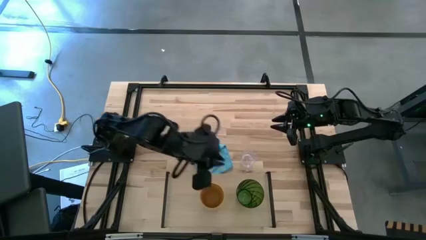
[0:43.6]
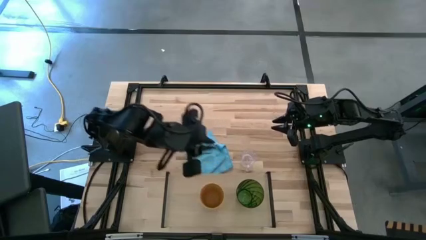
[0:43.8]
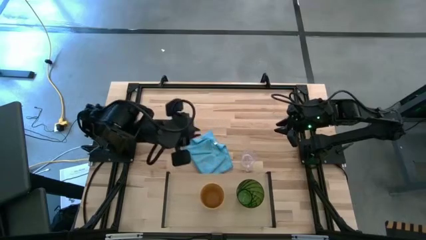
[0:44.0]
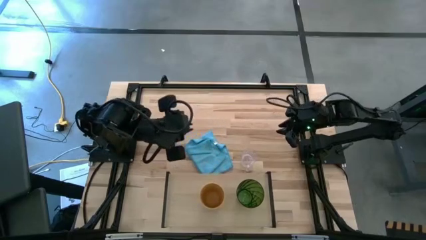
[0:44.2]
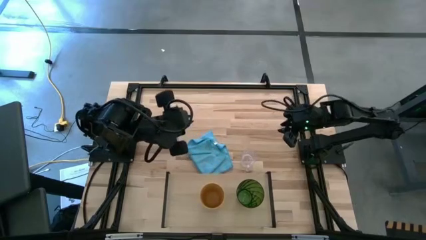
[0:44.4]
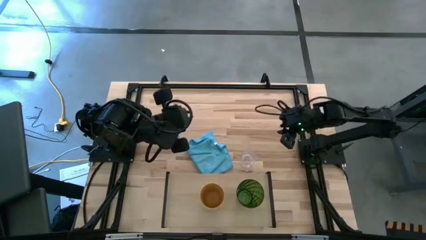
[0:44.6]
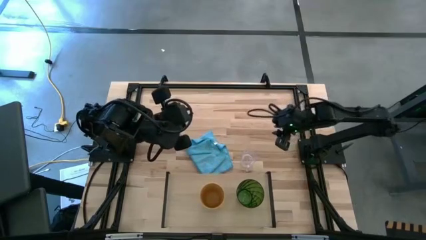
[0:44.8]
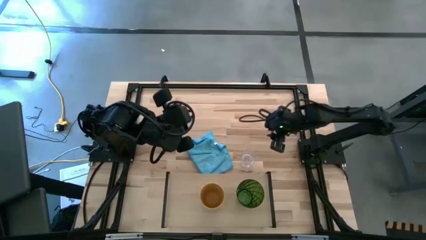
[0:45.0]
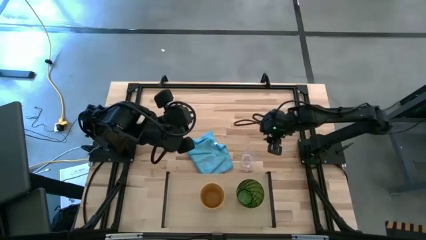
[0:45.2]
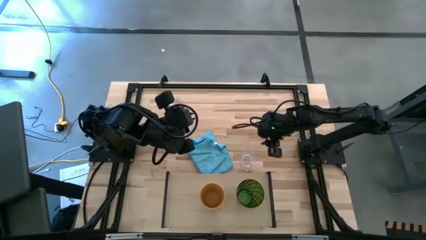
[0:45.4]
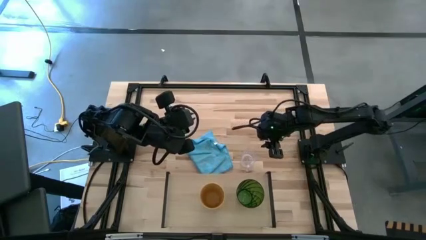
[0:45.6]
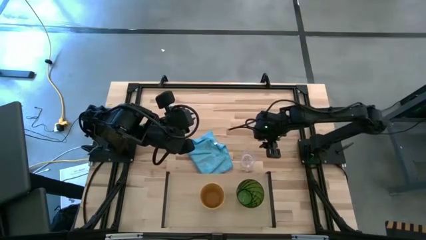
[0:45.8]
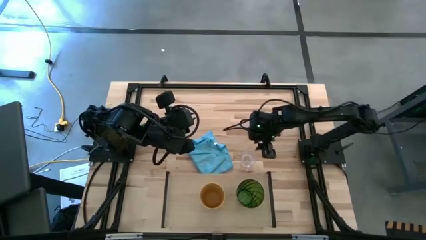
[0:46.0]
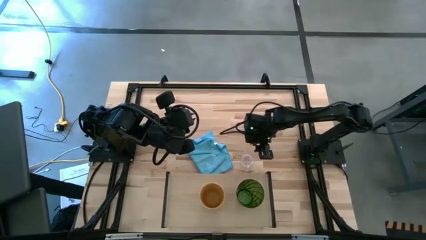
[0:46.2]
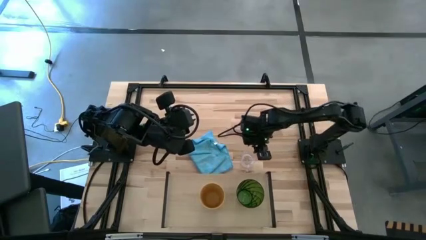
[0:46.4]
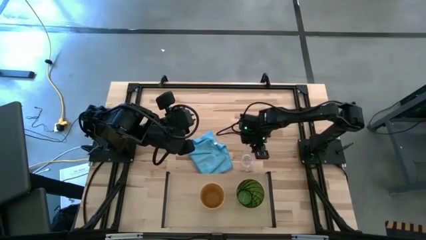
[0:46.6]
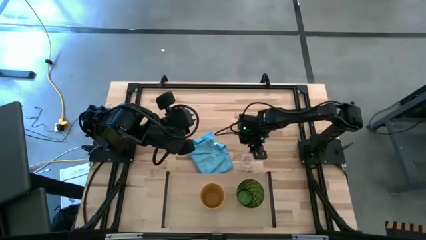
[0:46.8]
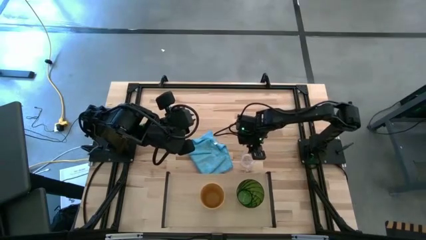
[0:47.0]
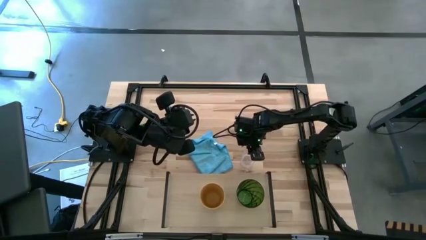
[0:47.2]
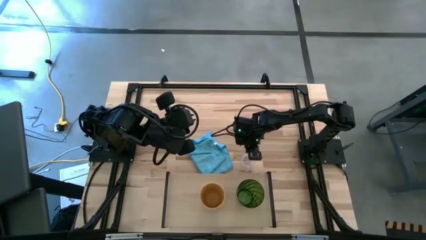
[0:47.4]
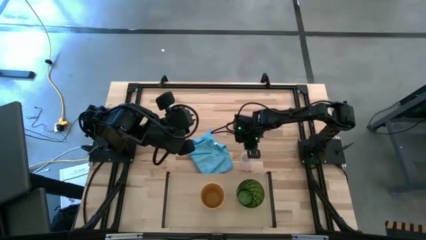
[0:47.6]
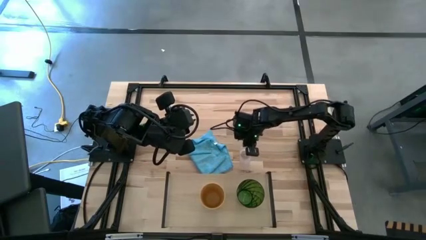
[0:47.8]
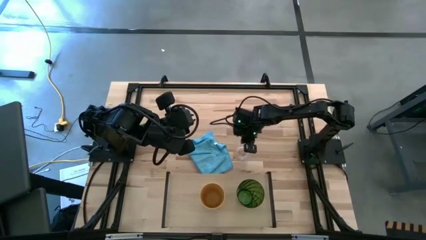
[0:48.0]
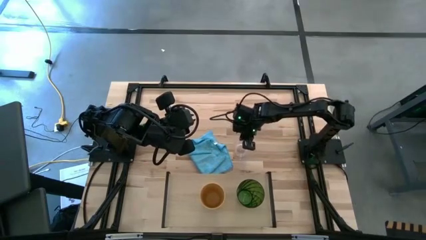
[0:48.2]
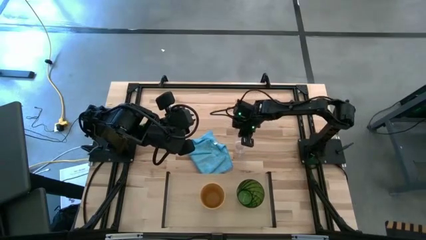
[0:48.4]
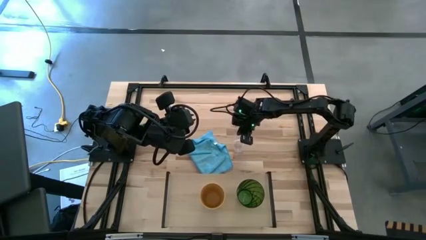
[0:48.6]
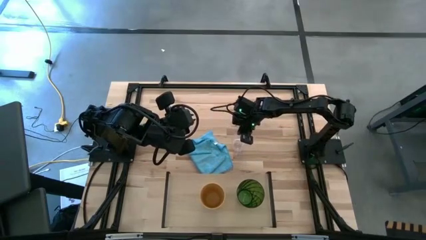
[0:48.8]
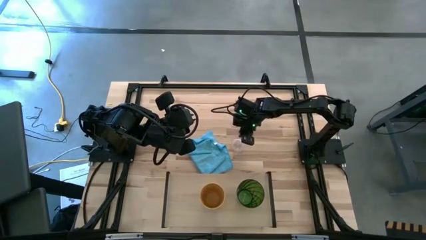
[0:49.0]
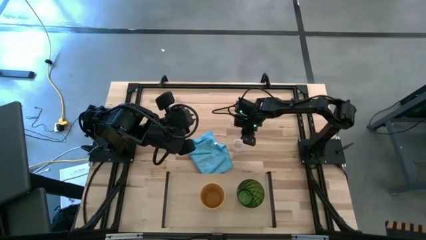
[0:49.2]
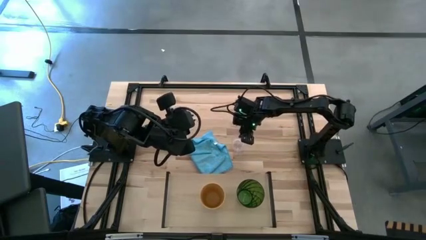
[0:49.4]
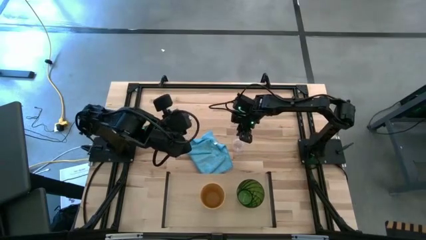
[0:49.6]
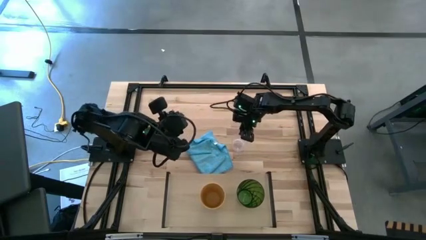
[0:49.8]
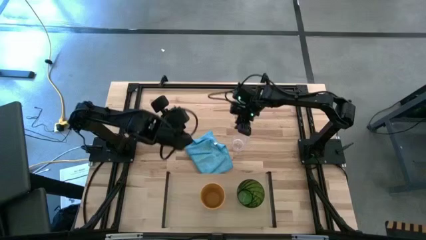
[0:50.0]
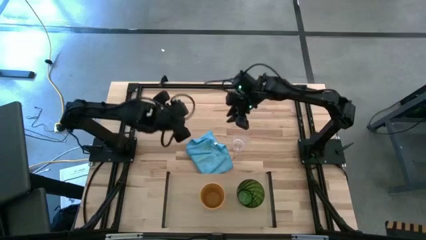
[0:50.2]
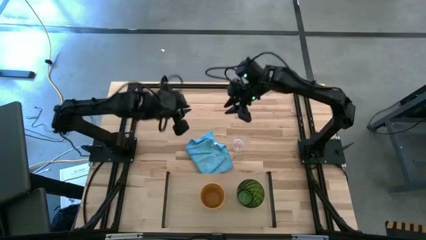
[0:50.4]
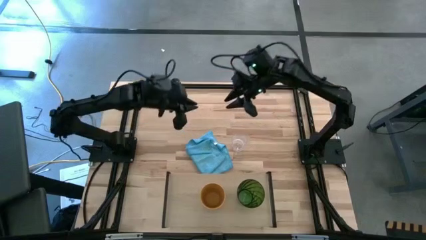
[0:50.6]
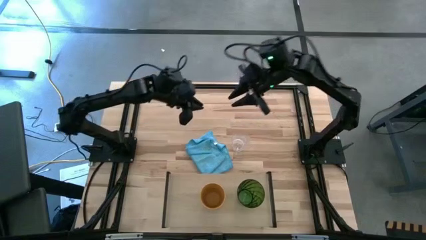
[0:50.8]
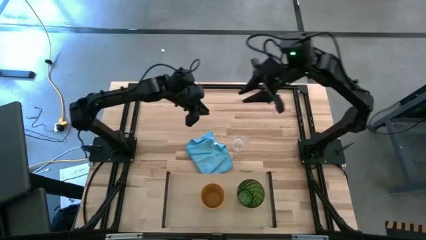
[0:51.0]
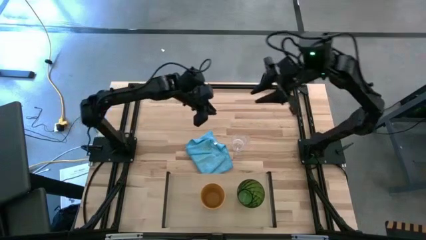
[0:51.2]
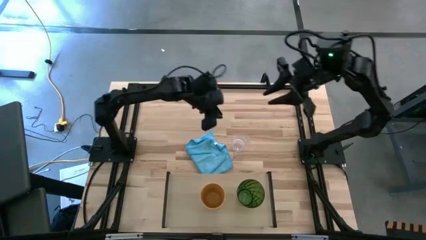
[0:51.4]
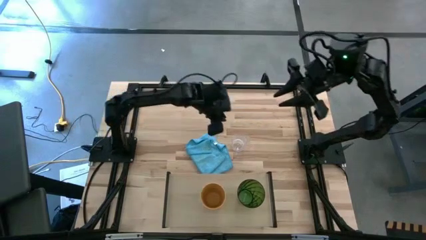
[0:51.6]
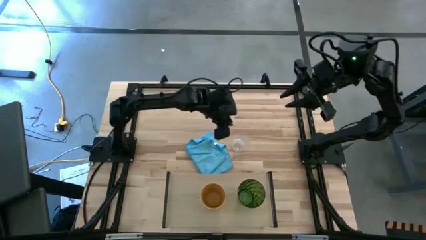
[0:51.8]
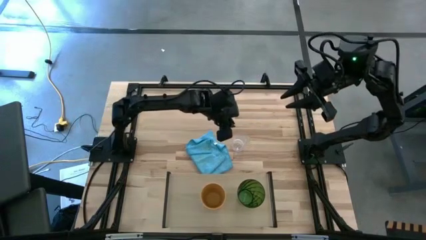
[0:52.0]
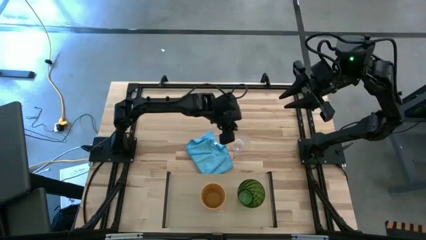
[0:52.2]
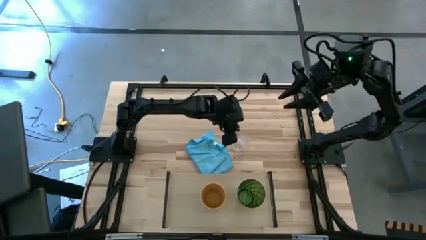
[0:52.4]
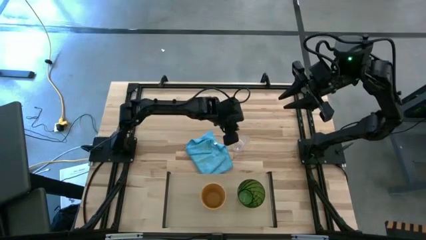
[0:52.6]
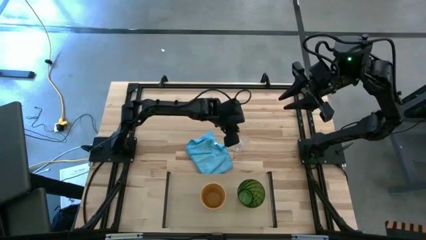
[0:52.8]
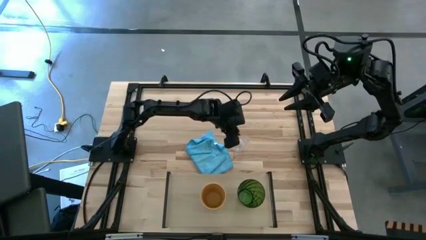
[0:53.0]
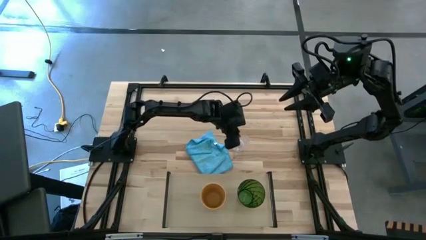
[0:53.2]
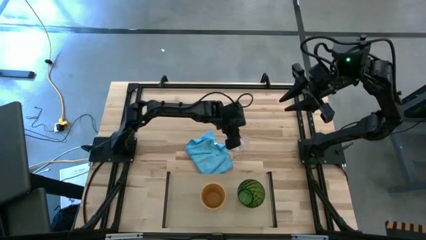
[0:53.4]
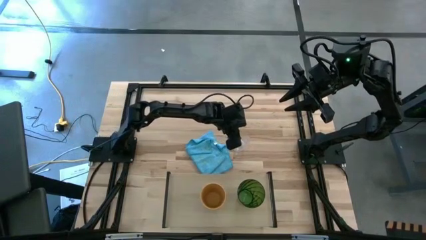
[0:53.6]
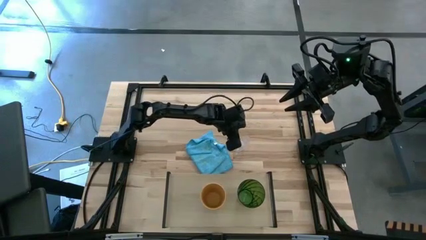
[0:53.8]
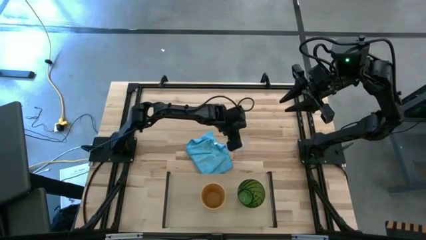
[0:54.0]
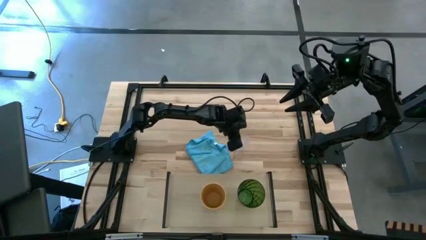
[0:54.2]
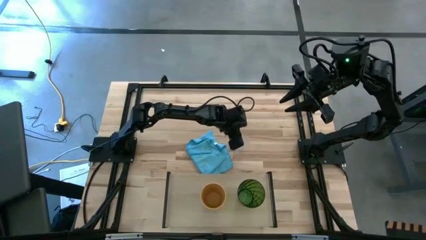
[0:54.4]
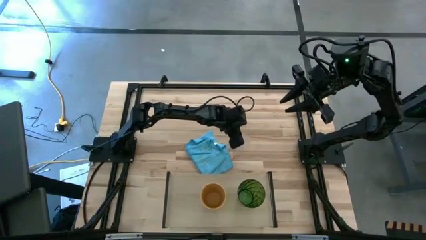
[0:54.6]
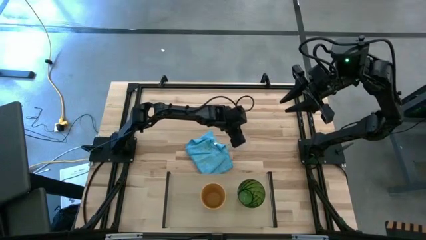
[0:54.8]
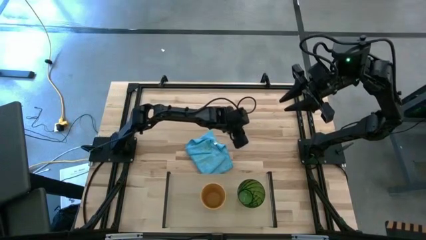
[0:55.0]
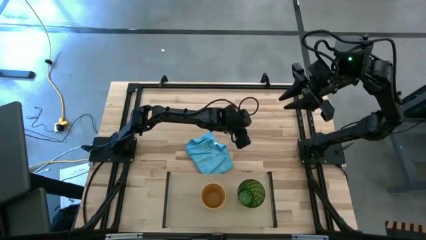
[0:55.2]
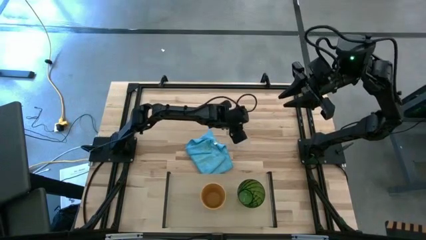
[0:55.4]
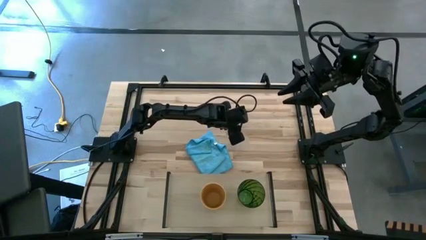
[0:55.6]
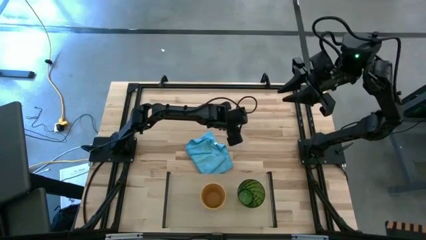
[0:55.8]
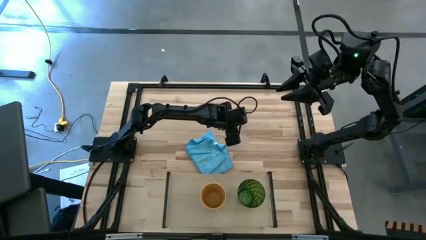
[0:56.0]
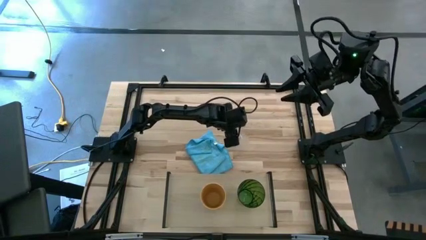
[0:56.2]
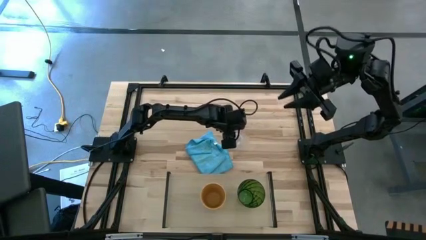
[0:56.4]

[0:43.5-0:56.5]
Task: Stack small to large cups/mugs on shelf
Put the transparent mug on the shelf

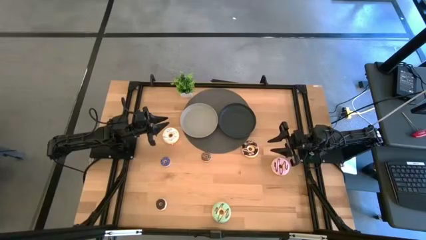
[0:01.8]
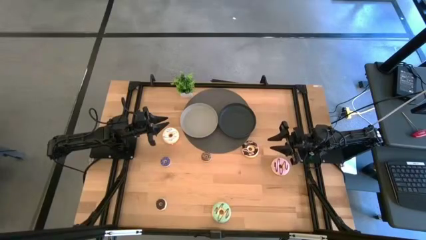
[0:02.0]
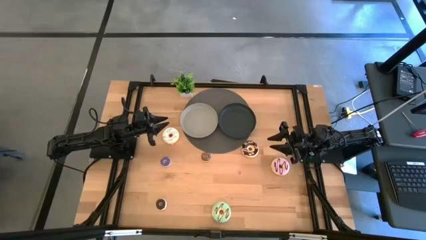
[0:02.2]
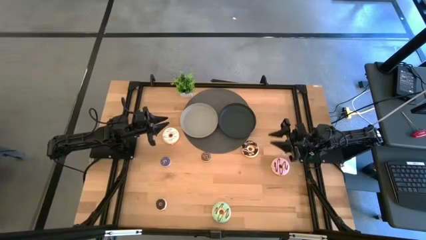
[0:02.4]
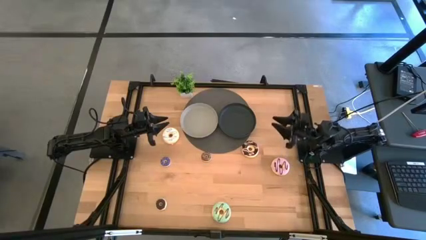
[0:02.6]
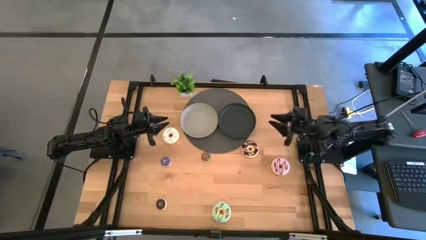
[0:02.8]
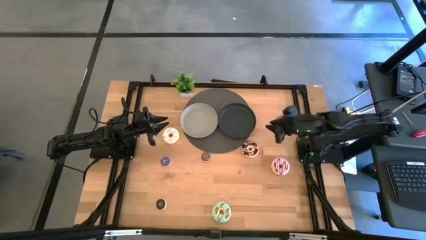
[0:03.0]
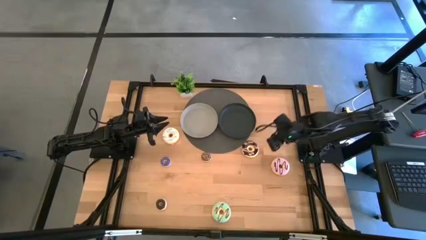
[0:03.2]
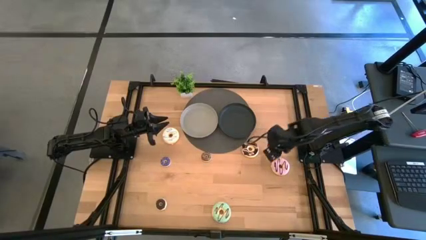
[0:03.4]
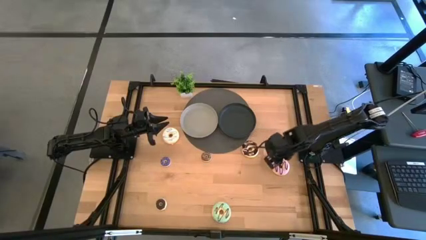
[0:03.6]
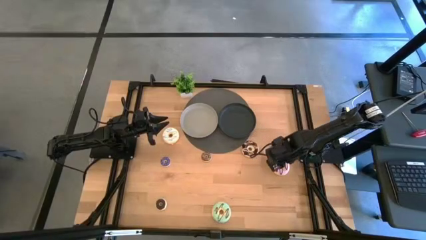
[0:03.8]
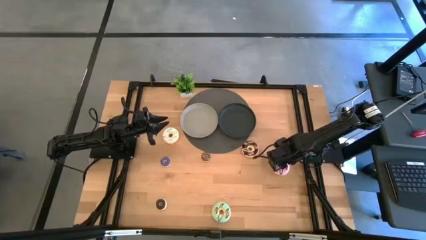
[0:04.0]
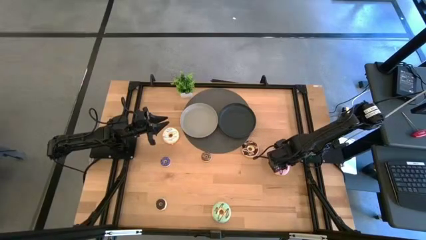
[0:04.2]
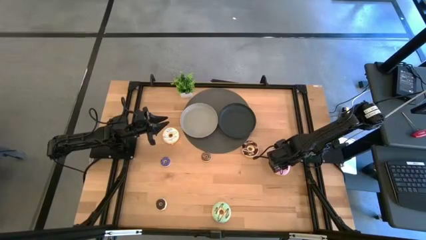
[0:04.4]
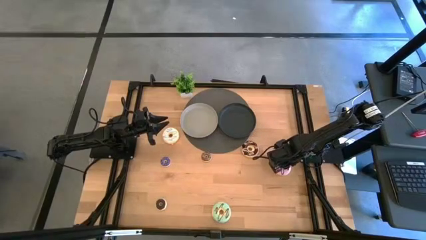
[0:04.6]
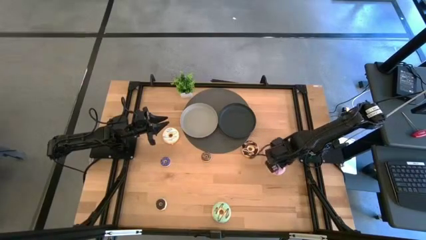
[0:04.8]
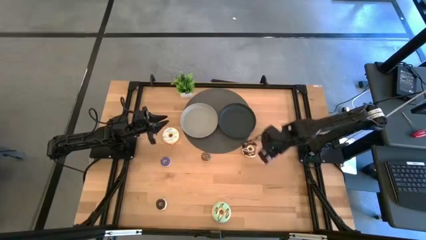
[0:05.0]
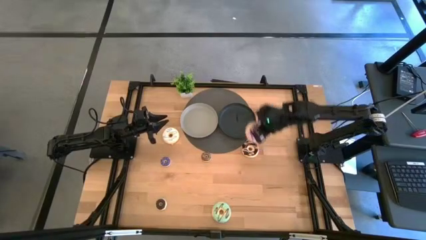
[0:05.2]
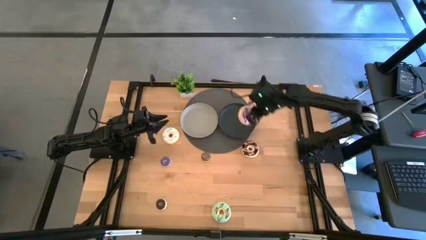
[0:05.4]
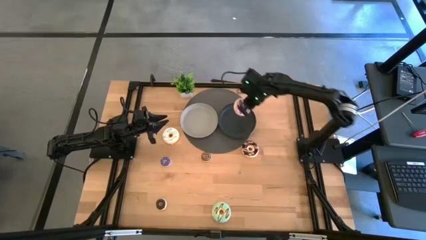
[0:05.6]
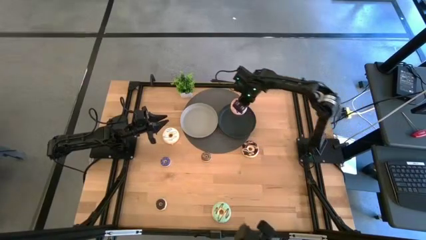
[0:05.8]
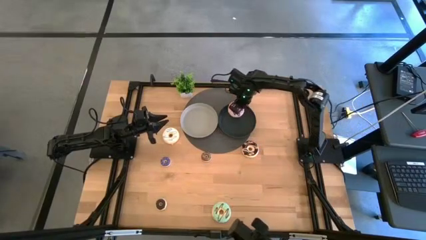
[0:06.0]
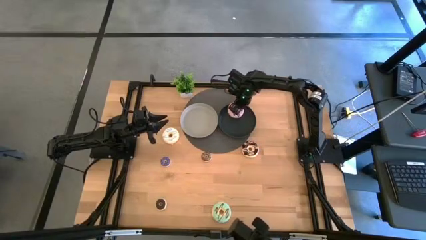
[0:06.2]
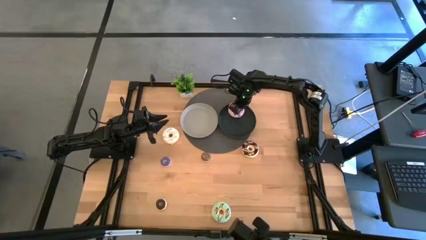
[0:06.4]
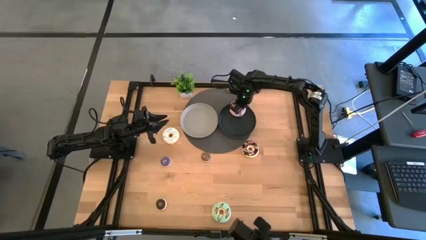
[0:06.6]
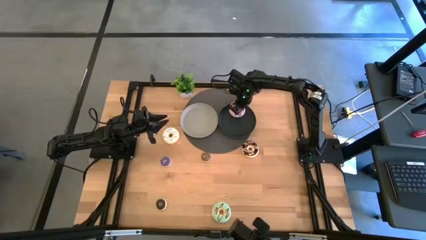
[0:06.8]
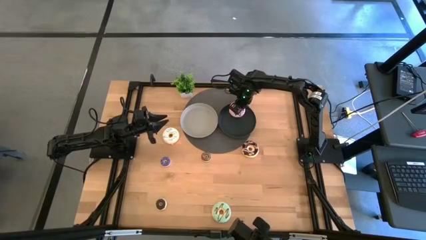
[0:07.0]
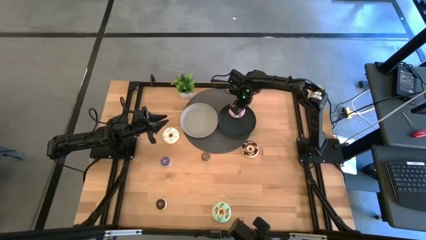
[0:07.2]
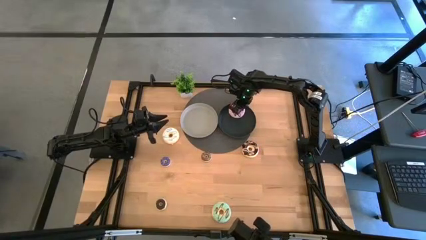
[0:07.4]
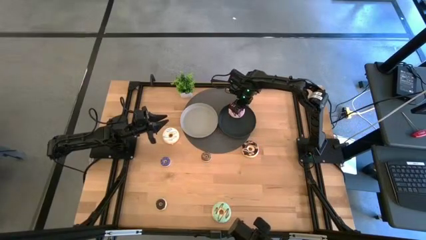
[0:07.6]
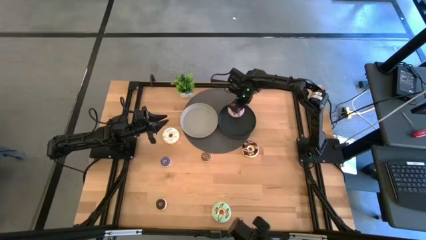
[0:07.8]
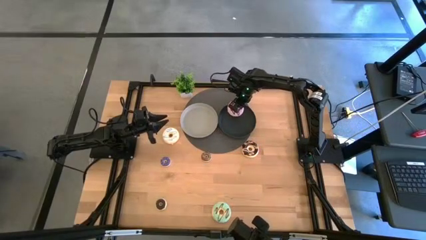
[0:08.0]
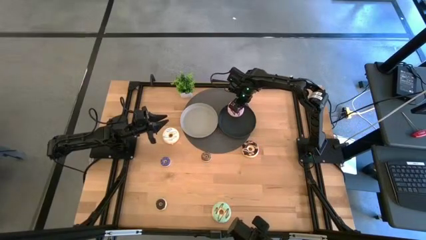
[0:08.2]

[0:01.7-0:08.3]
Task: Pick & Place donuts
Put the big purple donut on the black plate
